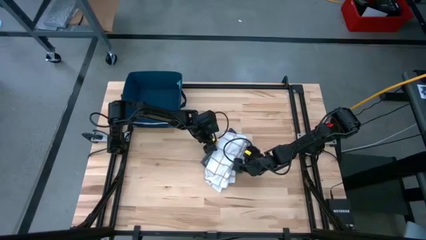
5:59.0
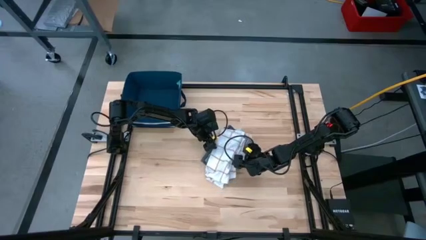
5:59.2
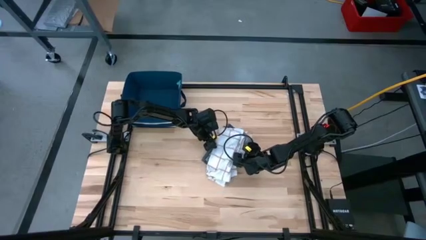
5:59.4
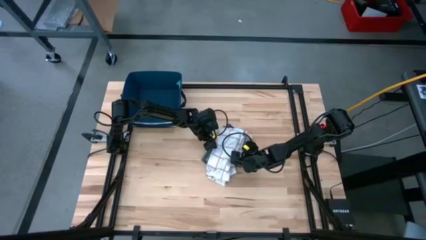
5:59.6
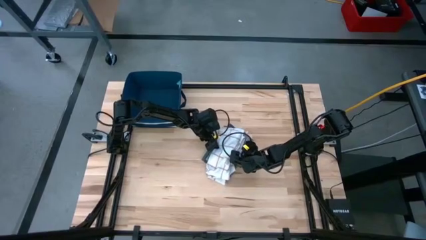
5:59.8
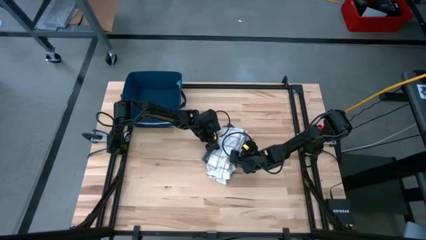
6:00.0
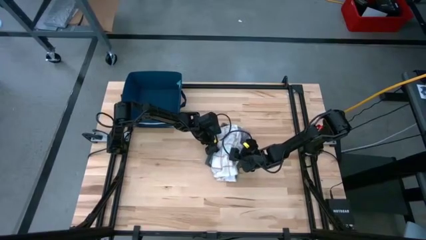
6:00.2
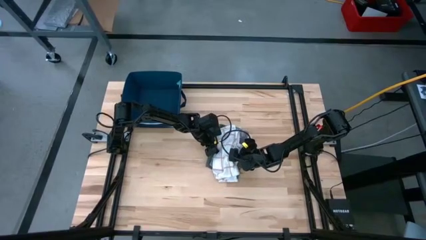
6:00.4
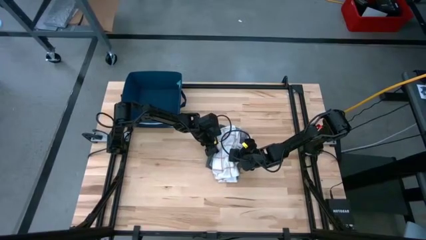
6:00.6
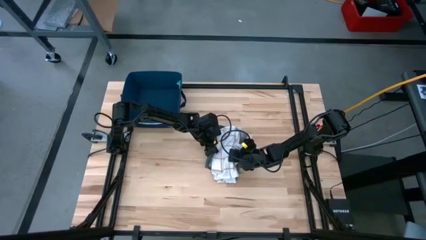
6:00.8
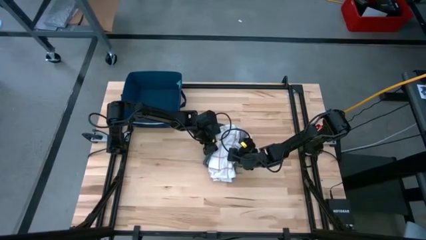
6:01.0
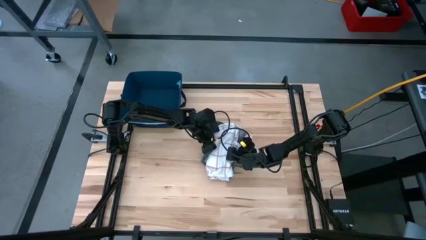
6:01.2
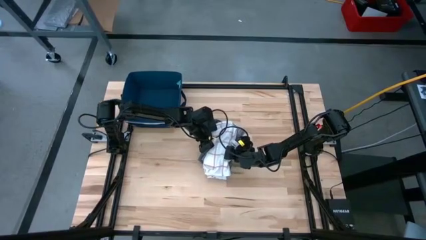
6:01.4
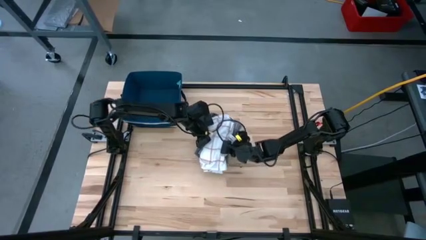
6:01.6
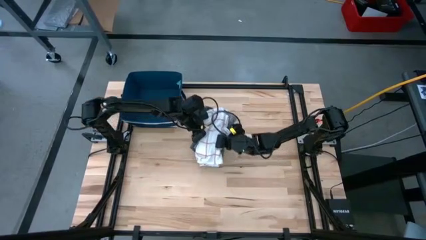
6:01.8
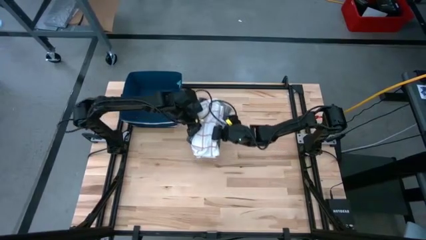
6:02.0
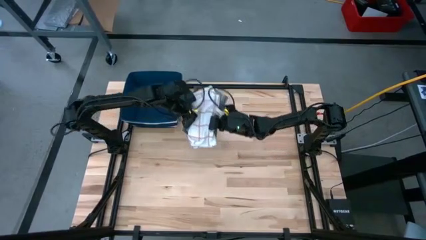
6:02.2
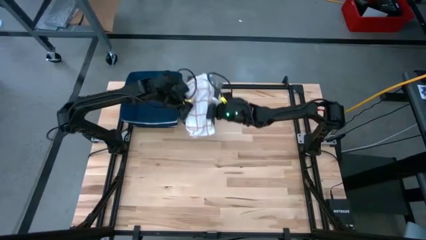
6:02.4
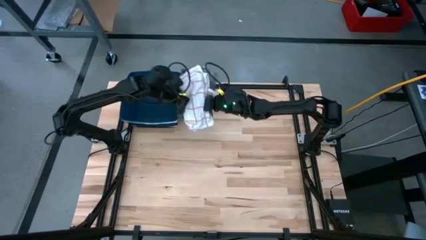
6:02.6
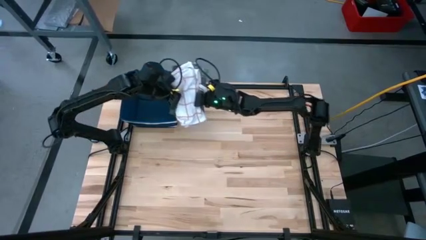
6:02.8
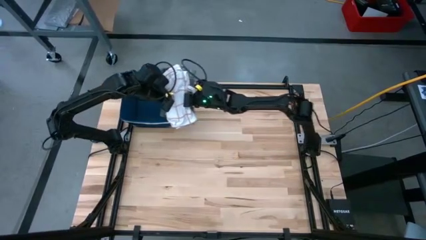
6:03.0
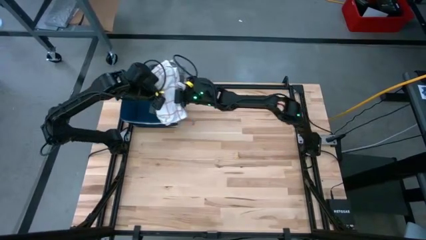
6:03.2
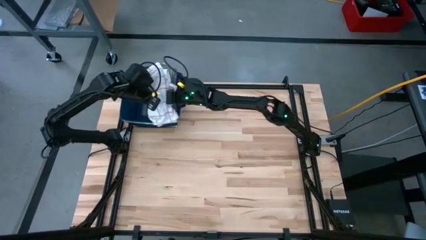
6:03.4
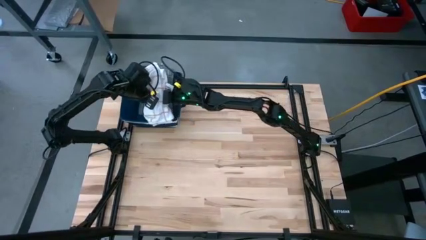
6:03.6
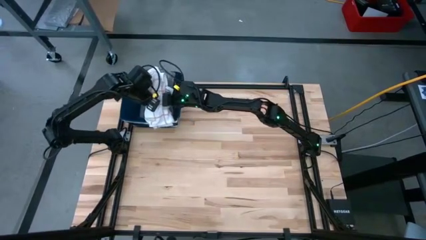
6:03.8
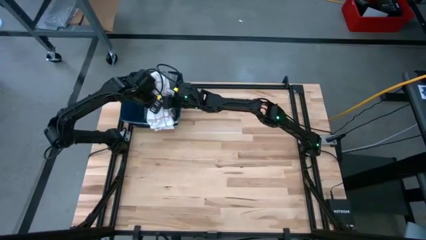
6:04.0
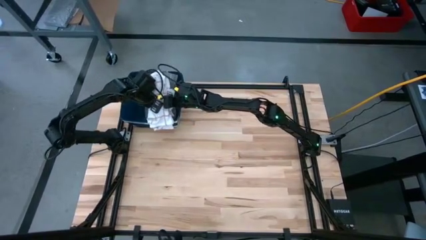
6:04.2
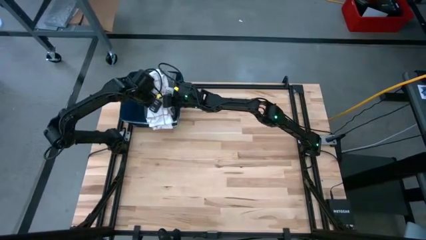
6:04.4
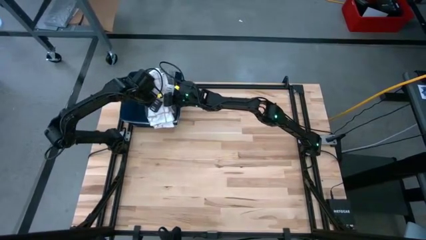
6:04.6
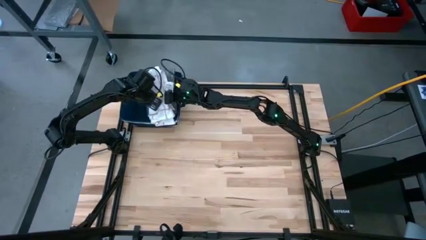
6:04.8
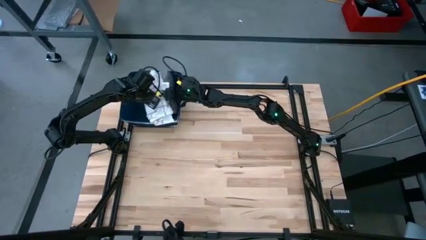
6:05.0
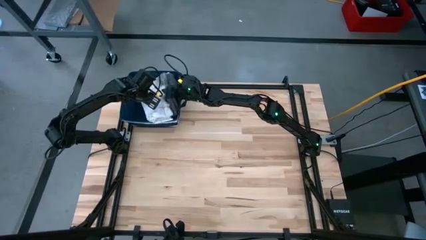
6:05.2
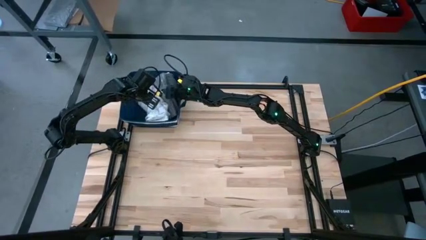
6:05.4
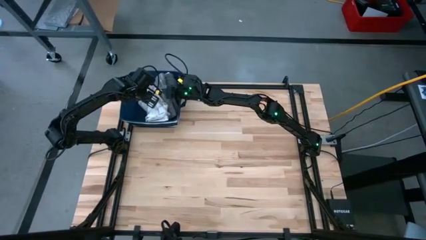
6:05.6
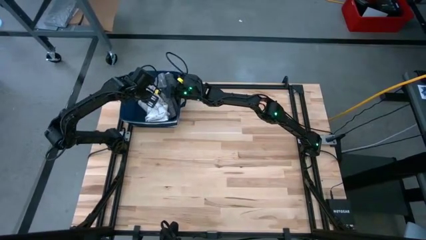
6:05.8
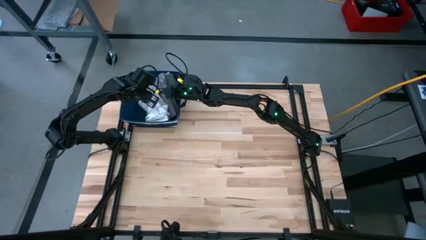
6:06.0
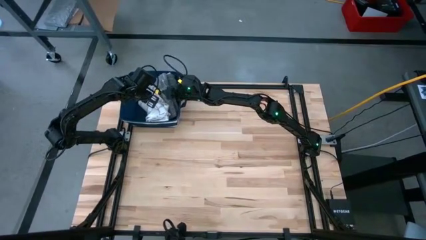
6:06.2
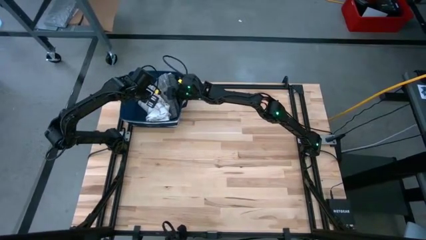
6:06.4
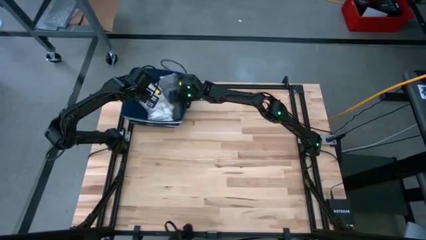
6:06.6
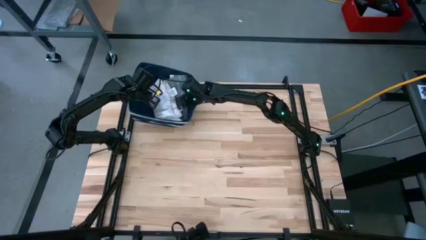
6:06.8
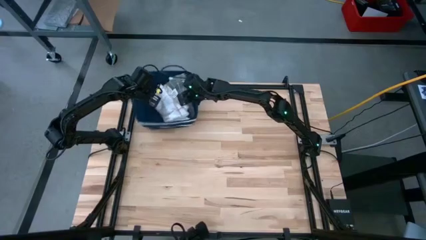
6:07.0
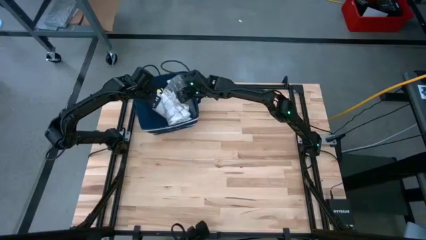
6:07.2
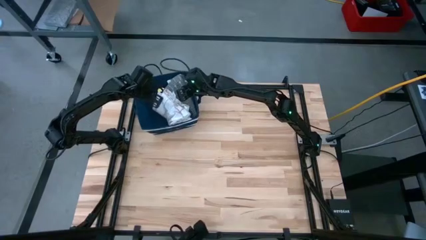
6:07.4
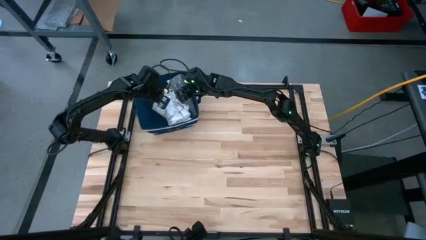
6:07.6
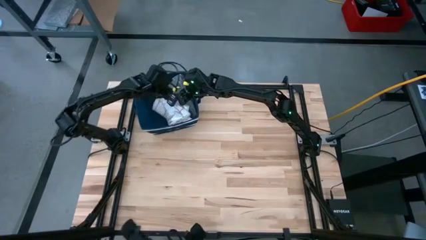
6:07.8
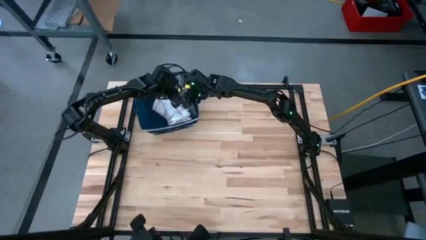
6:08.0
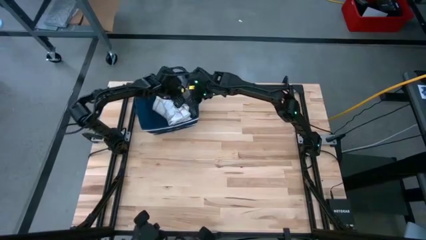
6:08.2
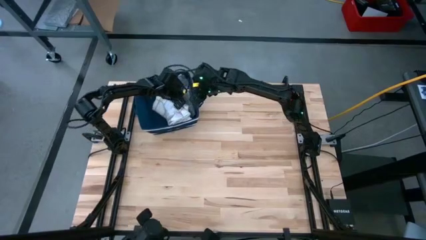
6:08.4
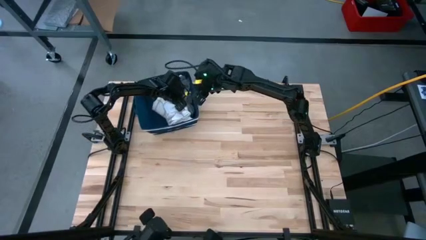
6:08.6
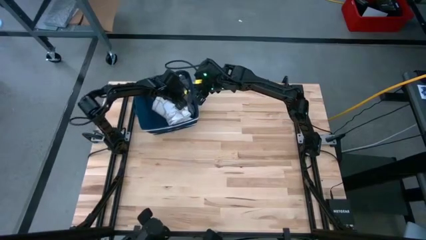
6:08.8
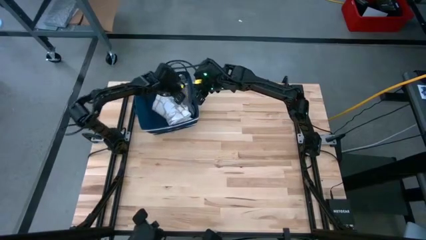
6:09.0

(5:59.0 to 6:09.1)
Task: Fold towel
Put the stacked towels into the blue bin

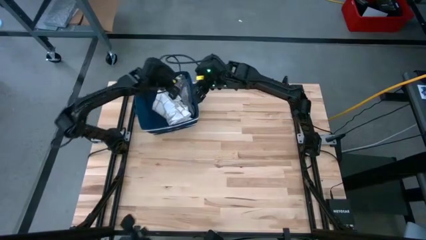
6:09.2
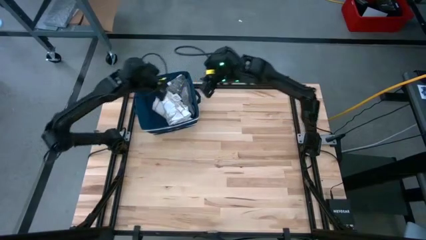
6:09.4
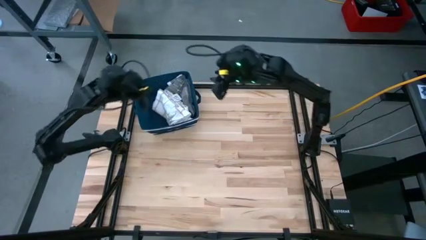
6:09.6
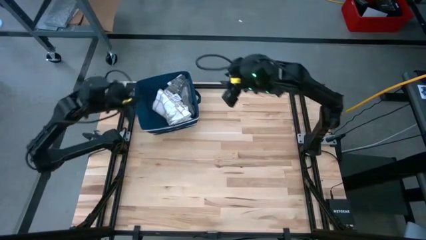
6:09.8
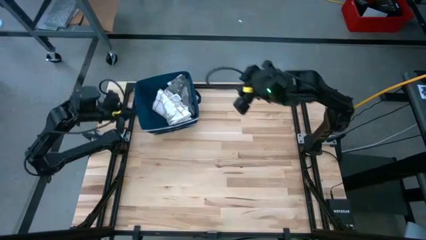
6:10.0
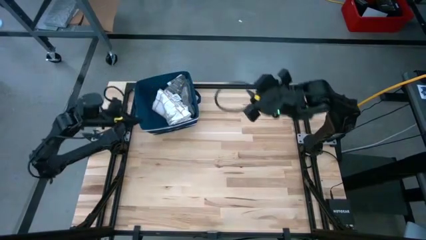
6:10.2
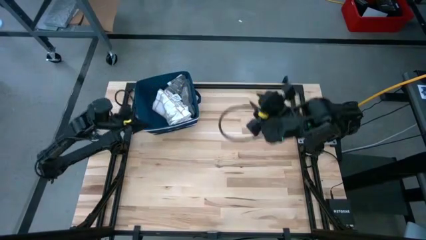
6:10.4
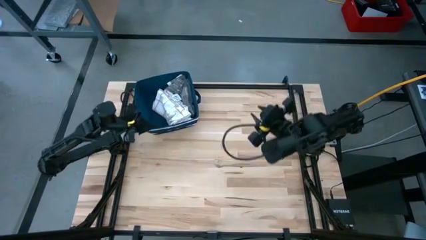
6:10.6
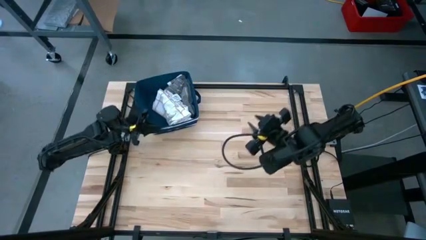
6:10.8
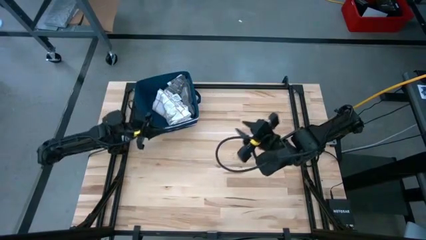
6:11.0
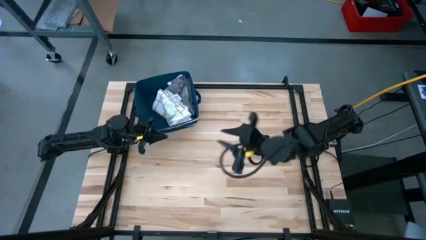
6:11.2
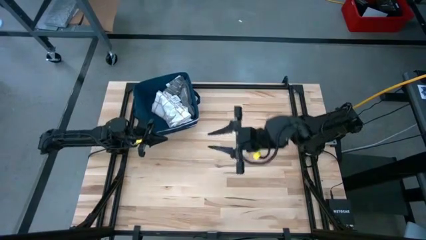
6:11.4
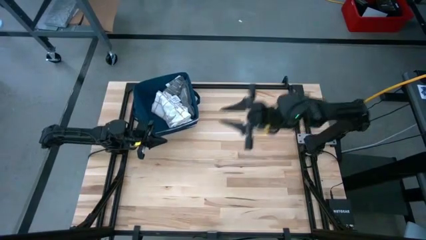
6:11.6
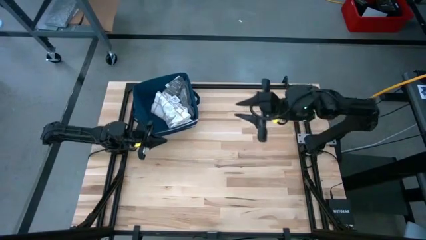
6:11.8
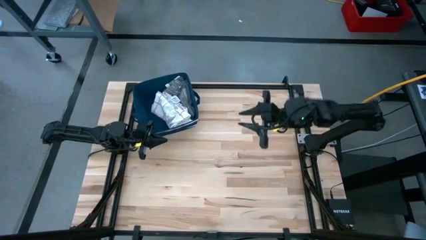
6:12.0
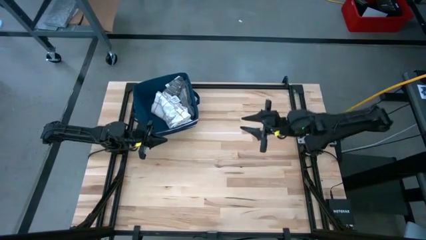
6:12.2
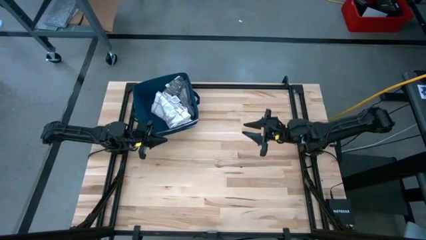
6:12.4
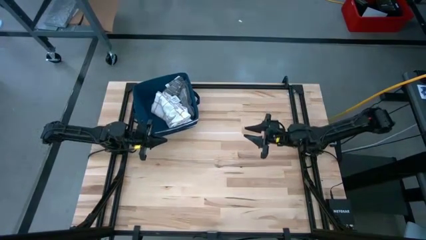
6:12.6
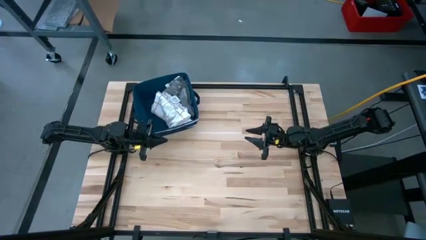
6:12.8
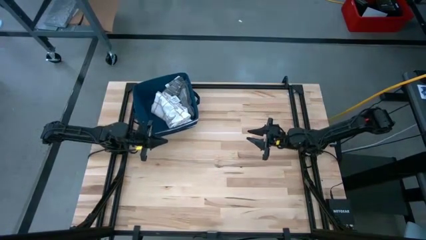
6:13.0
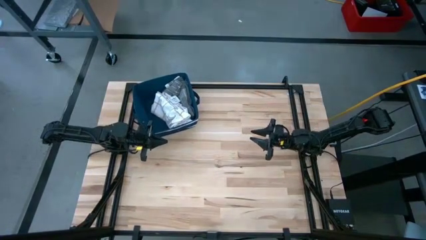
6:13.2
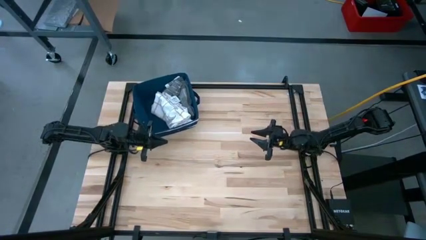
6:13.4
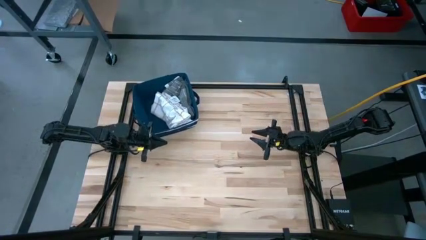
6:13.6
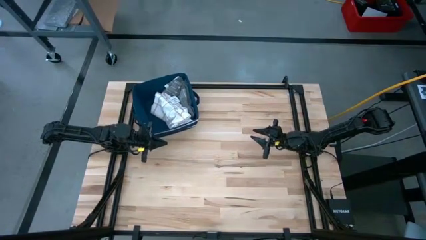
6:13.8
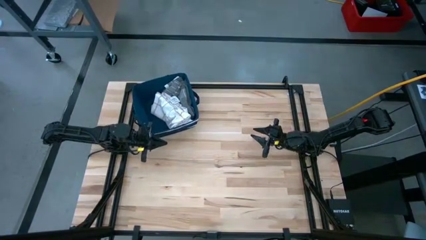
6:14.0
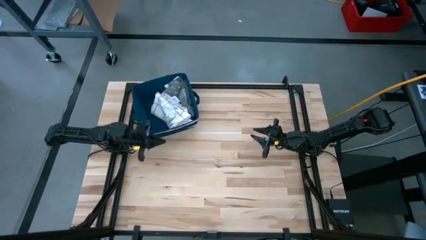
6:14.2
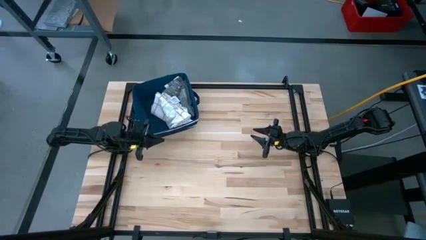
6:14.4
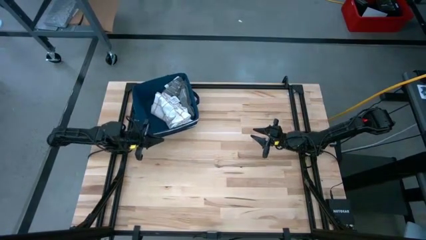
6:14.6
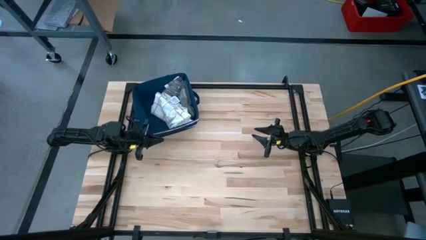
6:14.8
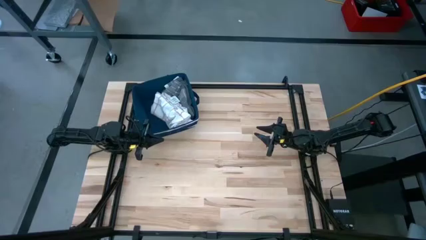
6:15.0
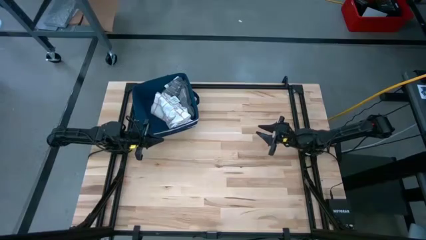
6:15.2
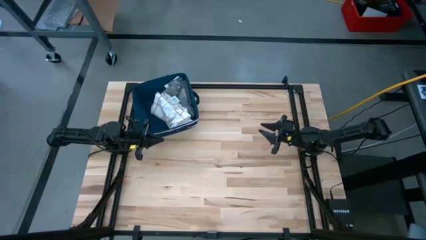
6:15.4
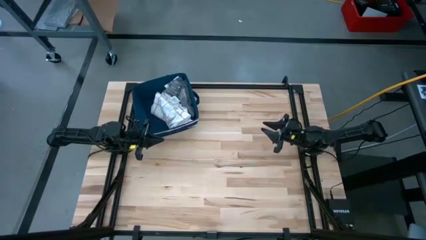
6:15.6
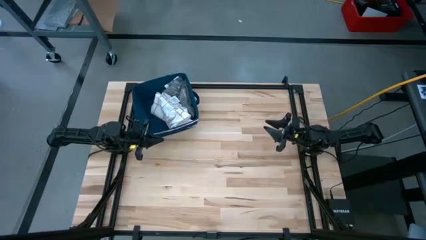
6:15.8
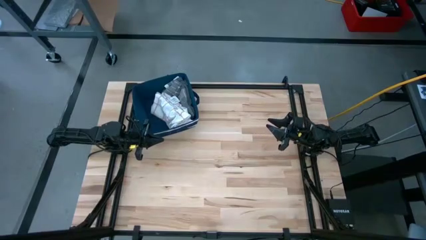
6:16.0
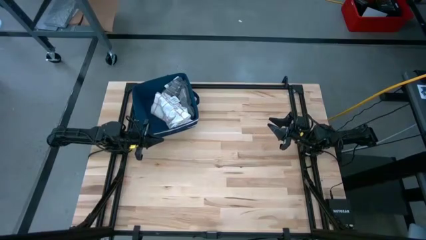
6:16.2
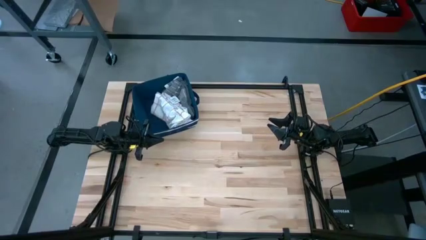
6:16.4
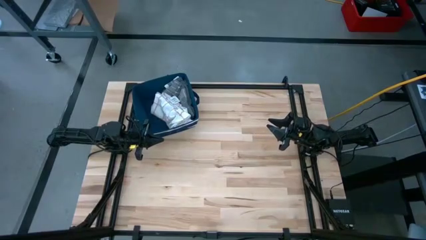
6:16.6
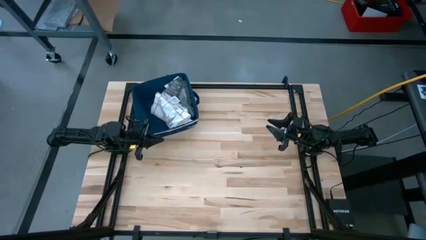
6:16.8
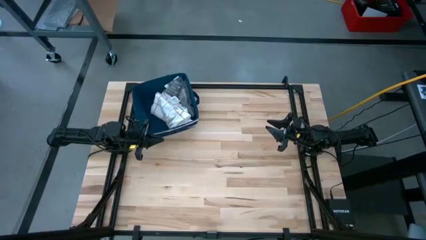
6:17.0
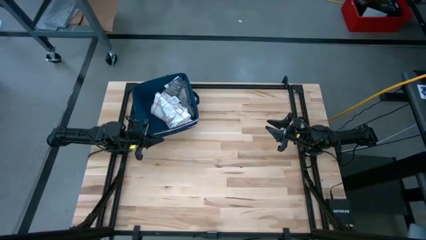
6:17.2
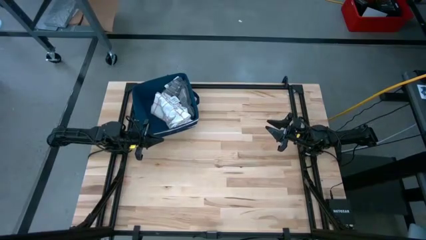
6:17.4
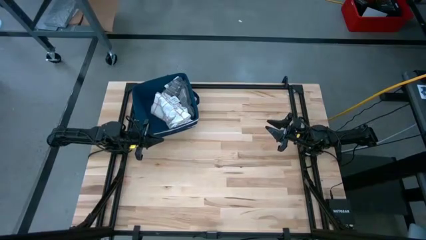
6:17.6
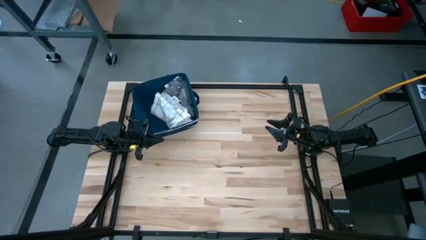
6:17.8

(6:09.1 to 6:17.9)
Return to Home Position
